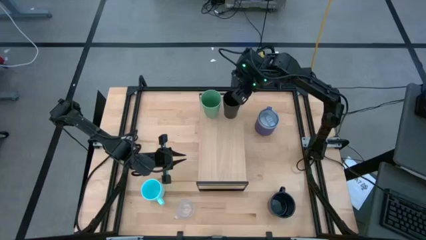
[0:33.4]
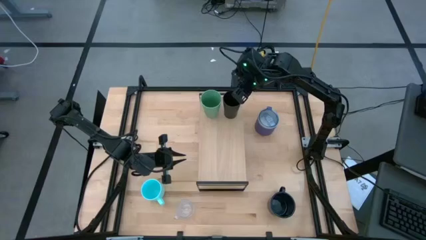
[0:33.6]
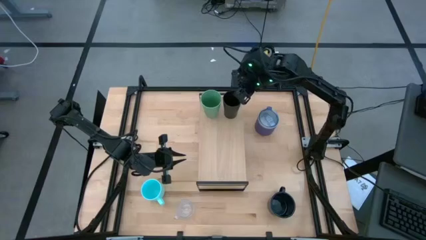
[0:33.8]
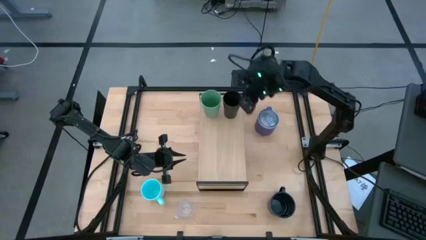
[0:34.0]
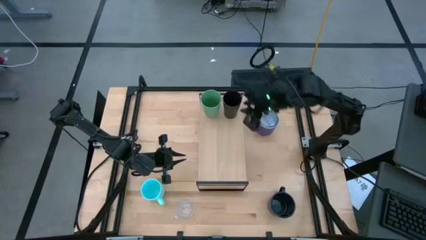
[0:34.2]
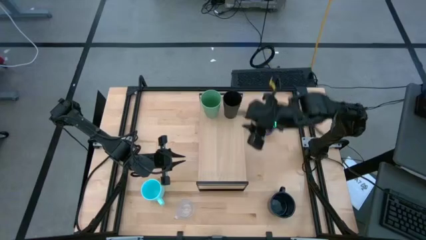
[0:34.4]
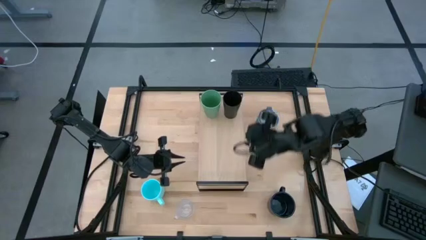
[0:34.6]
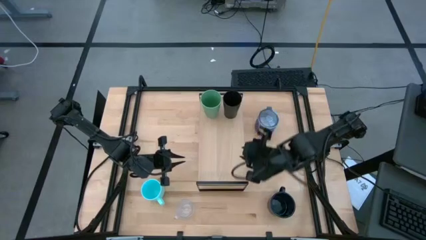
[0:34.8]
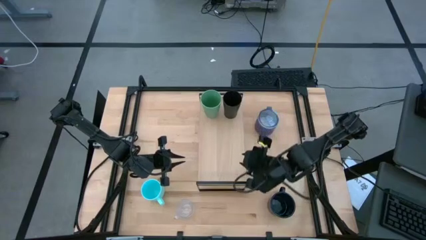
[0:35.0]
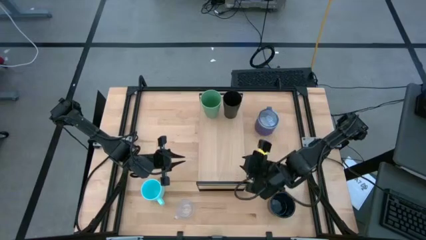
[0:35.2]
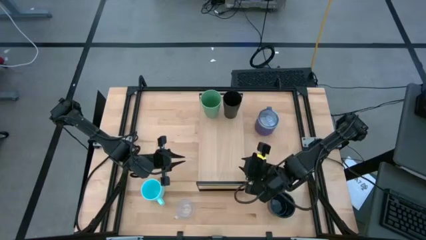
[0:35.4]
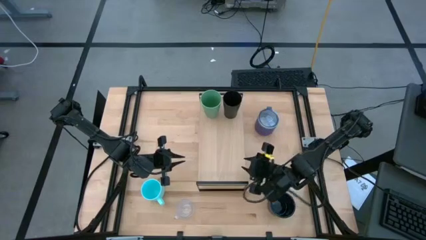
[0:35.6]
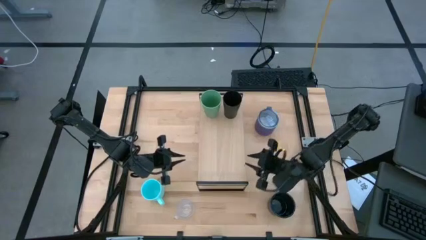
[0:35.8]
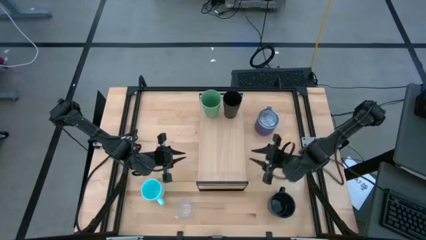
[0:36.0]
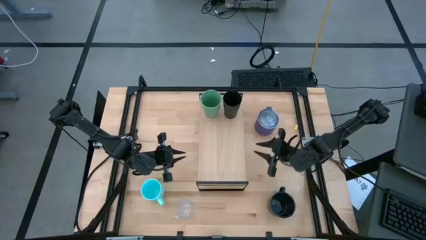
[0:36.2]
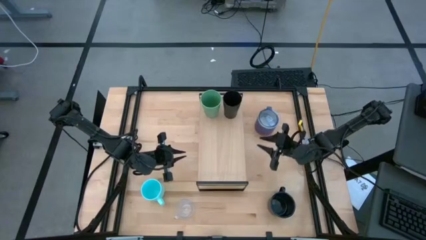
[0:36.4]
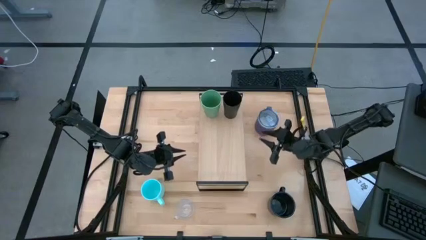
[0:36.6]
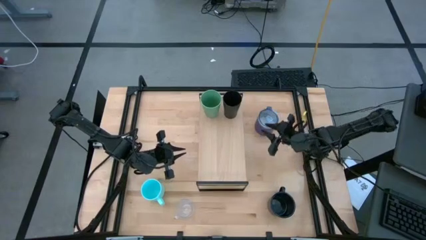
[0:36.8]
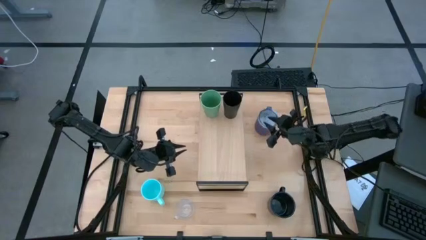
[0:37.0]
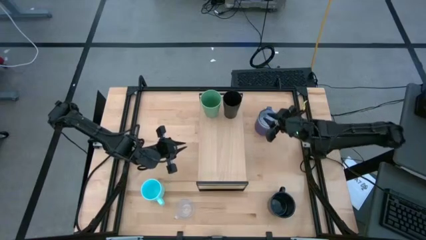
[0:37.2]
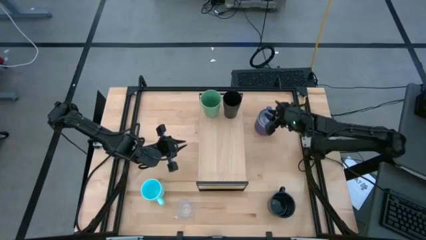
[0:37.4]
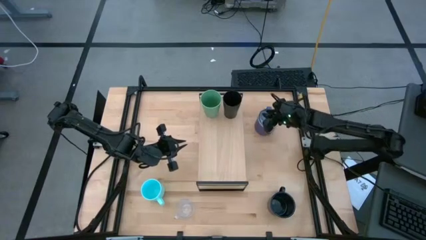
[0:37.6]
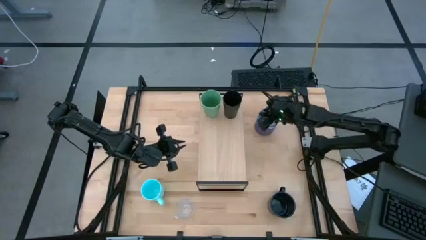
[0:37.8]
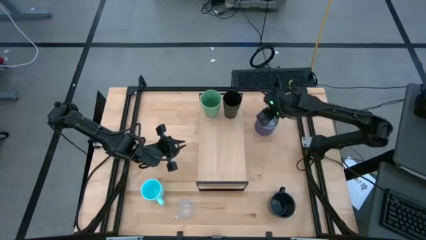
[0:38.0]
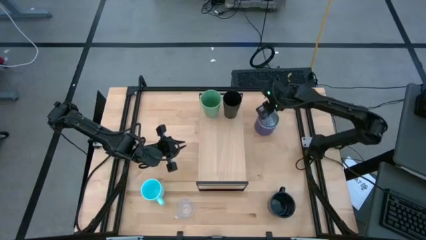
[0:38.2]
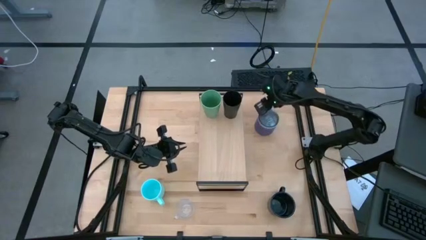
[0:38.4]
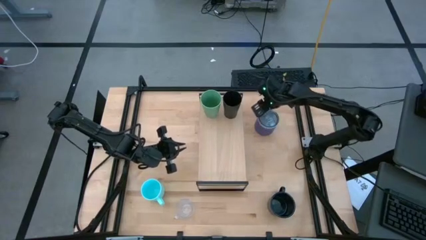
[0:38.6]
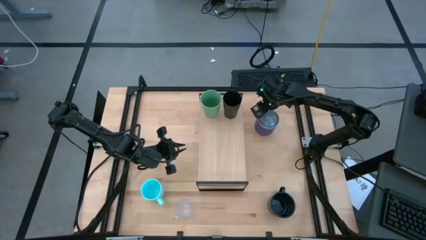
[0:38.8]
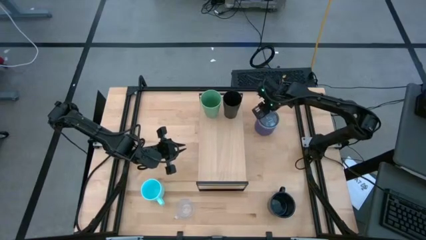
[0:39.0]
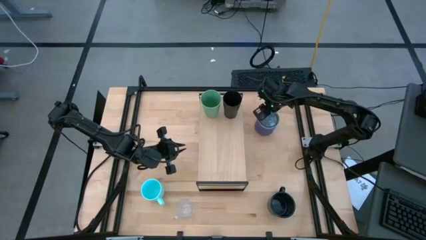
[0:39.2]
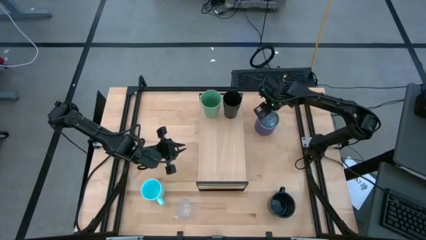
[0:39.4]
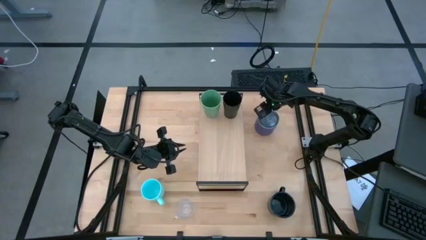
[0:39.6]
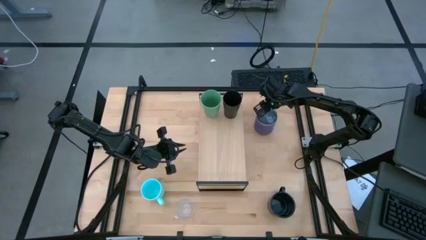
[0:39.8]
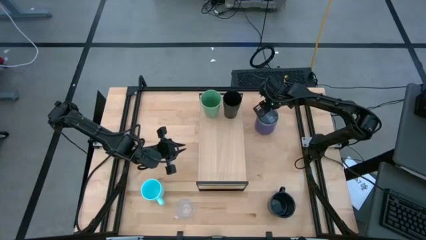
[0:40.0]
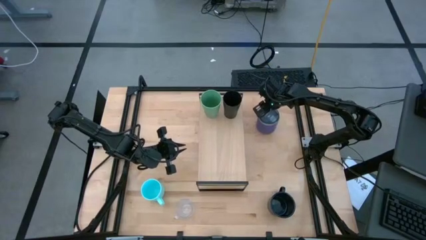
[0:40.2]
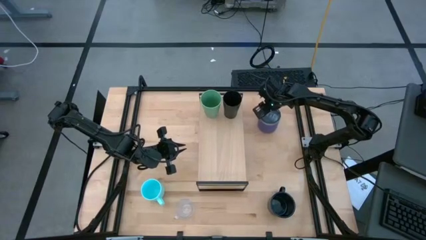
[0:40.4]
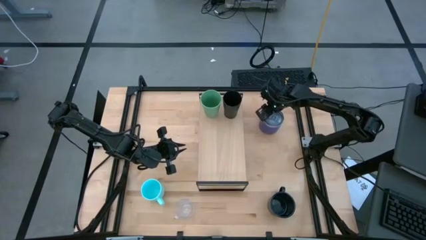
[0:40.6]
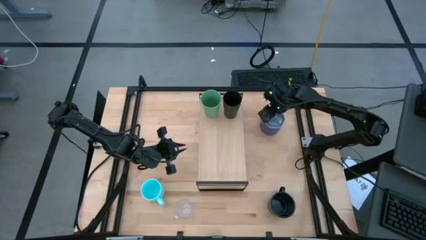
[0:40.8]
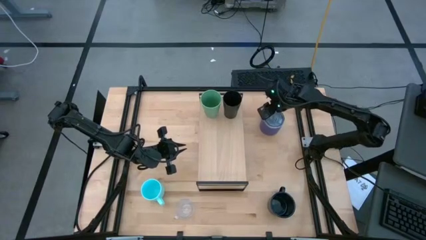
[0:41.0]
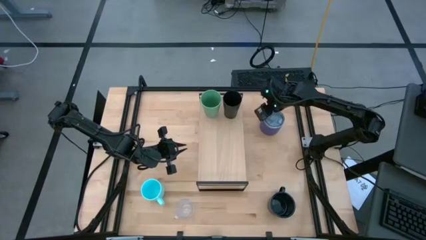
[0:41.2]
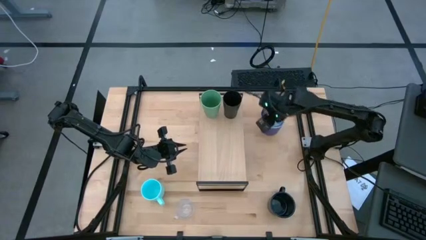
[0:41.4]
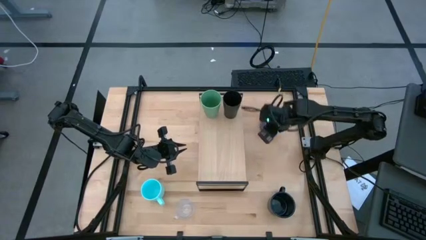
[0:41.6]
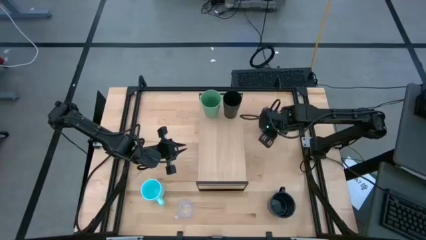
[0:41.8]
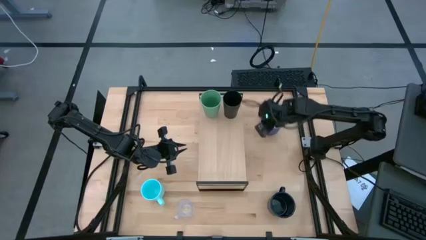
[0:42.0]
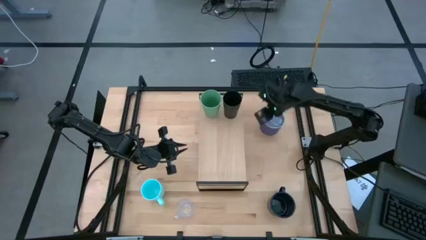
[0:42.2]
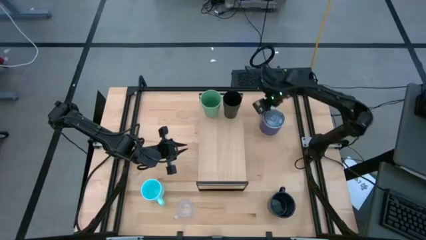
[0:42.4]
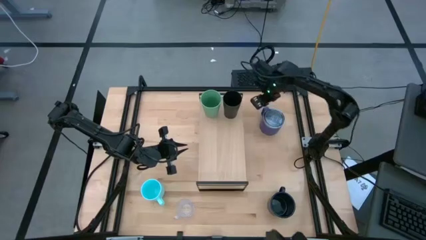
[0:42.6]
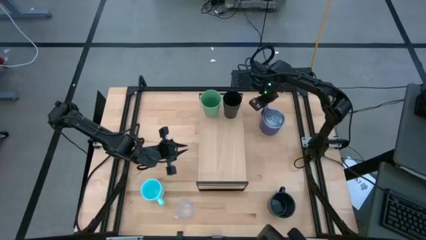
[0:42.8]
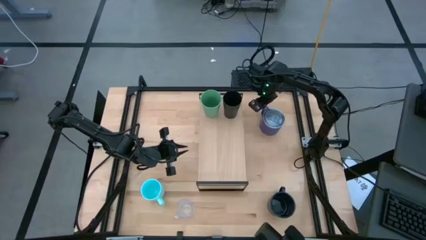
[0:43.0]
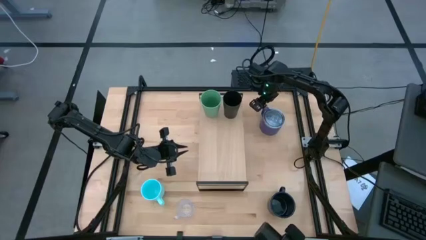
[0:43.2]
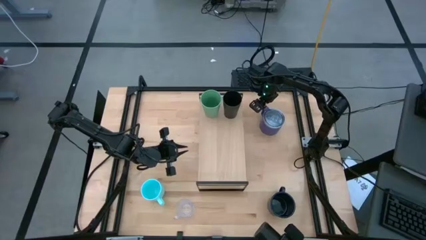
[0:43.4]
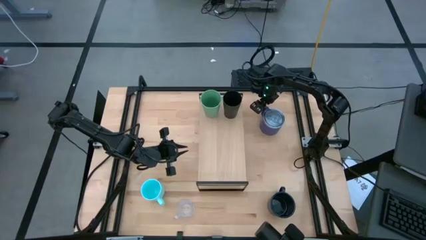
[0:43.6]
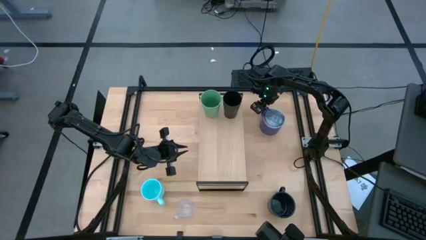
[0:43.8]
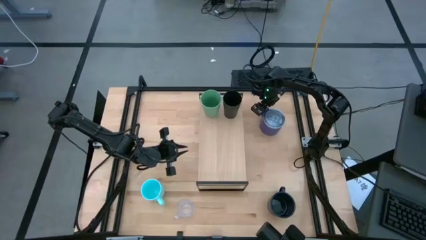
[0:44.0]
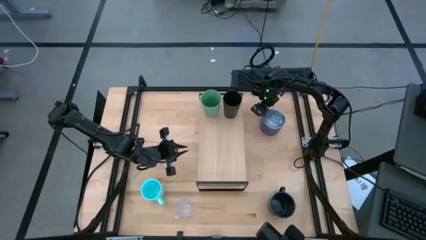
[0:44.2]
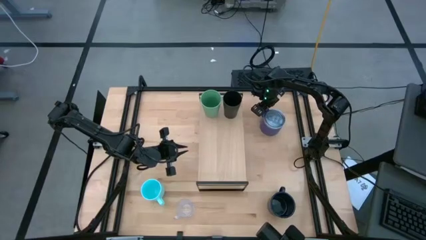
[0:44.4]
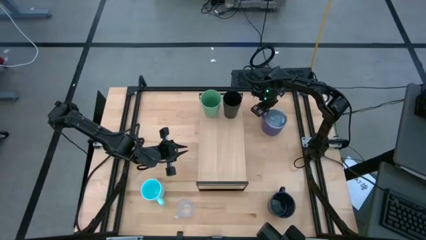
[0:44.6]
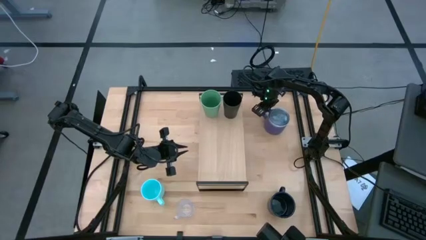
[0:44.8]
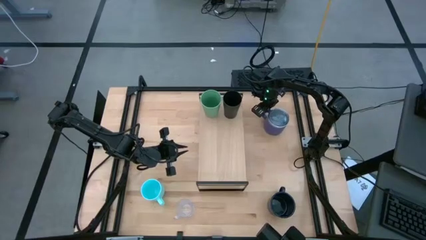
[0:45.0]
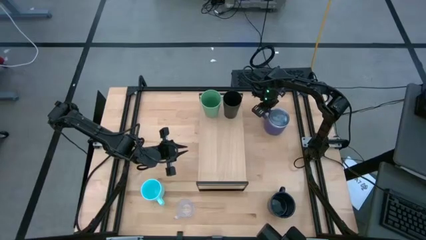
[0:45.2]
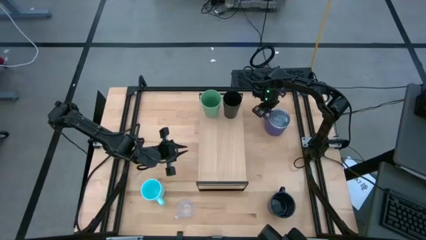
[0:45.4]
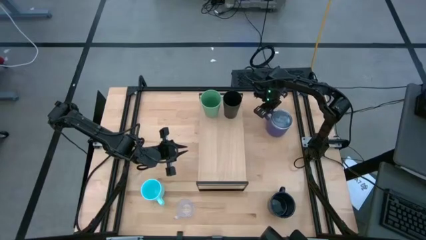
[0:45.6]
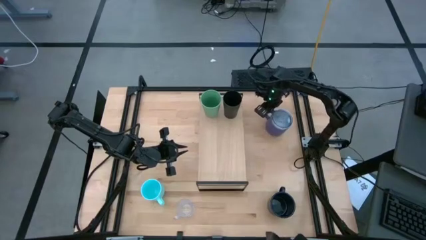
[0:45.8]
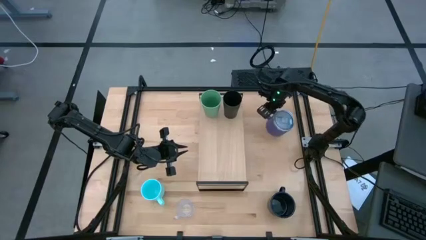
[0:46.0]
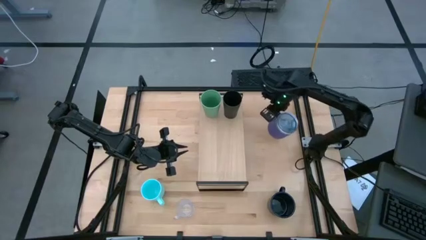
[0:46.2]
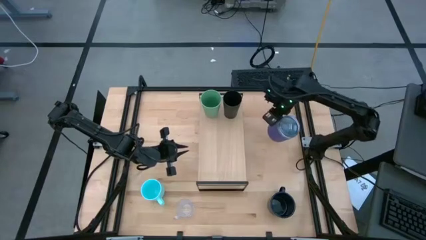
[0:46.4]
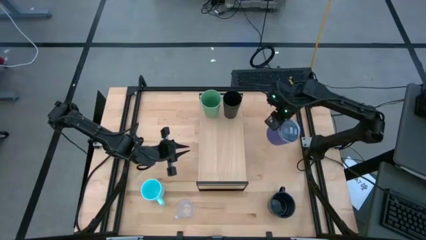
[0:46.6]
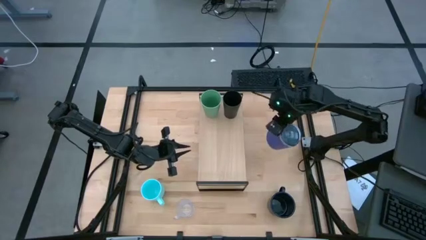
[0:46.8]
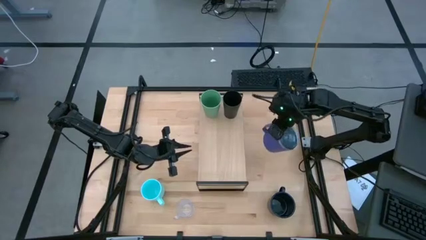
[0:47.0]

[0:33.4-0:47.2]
Task: Stack small to large cups/mugs on shelf
Put the purple mug on the shelf

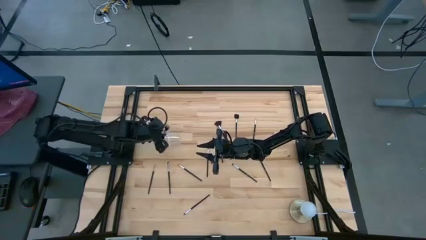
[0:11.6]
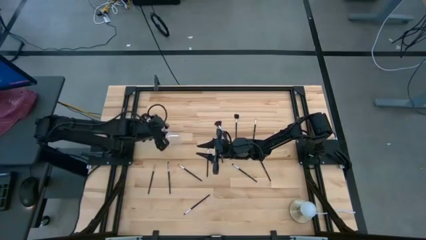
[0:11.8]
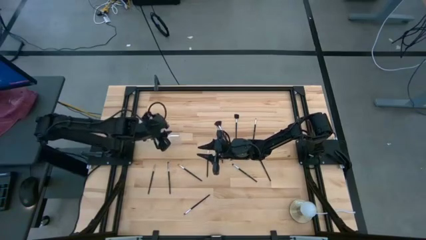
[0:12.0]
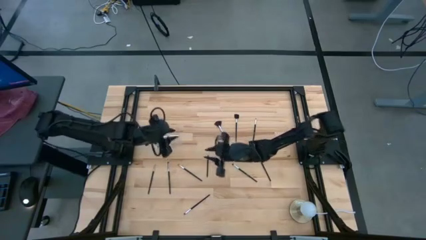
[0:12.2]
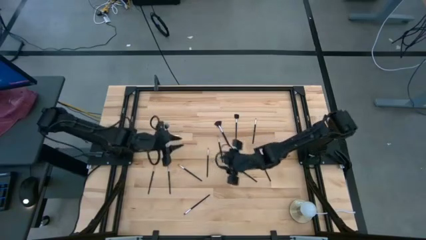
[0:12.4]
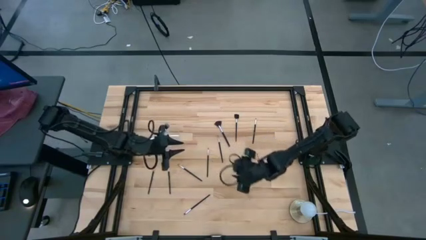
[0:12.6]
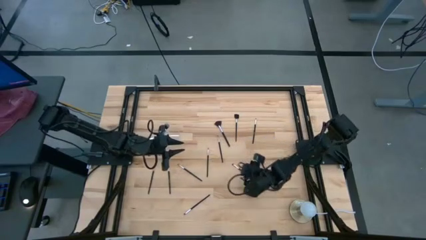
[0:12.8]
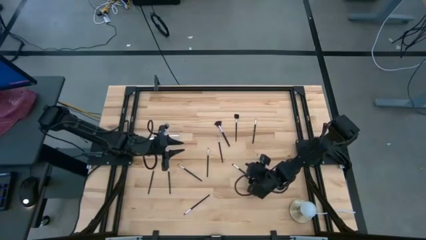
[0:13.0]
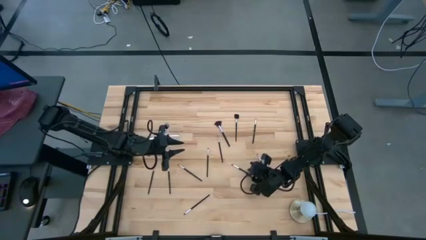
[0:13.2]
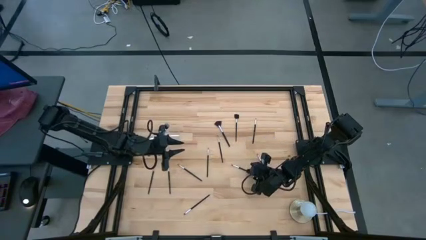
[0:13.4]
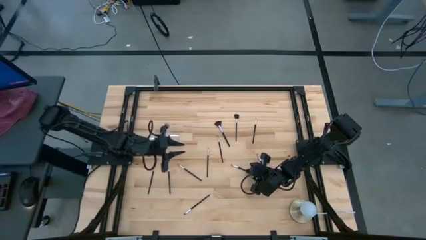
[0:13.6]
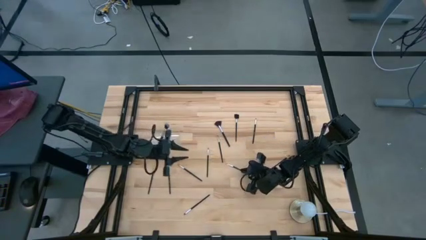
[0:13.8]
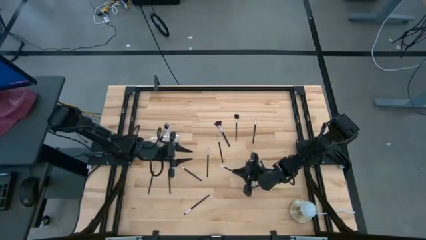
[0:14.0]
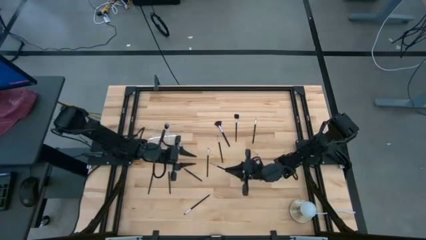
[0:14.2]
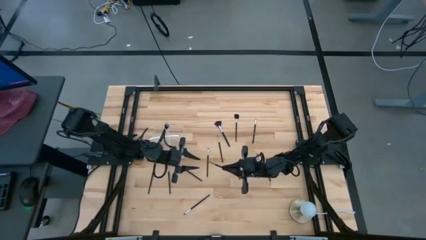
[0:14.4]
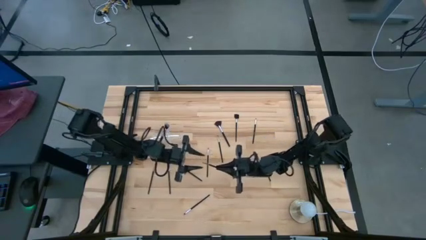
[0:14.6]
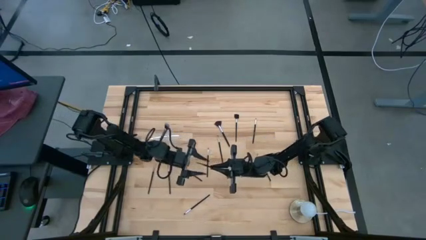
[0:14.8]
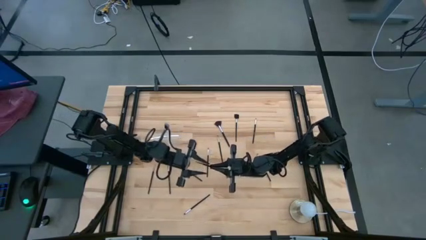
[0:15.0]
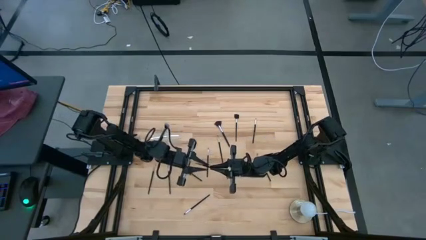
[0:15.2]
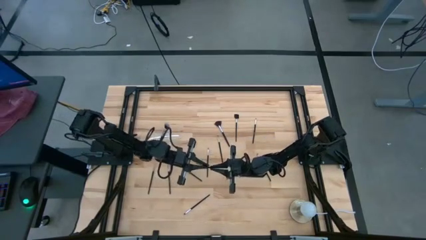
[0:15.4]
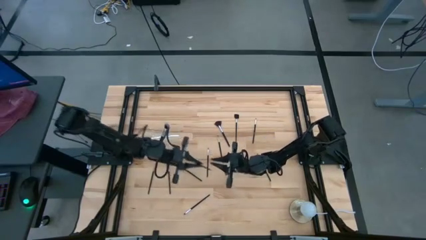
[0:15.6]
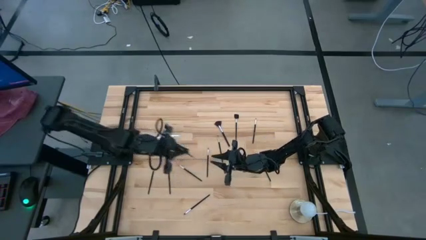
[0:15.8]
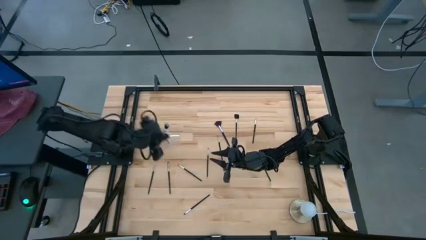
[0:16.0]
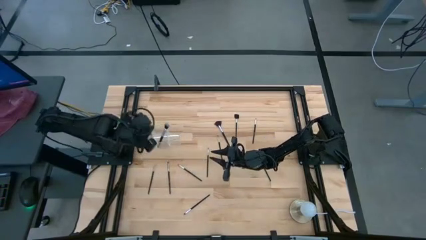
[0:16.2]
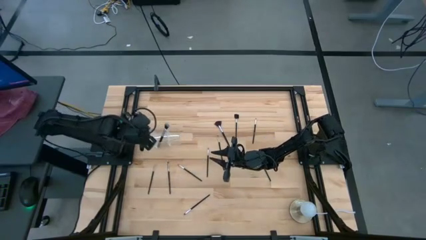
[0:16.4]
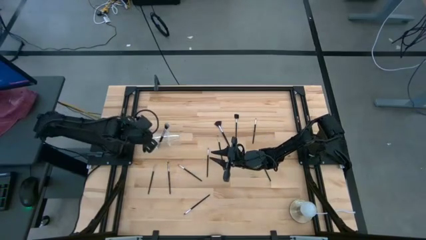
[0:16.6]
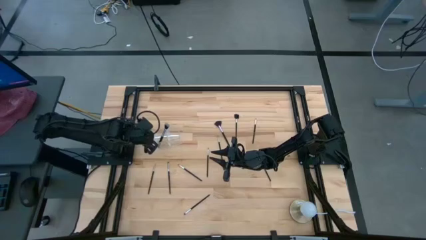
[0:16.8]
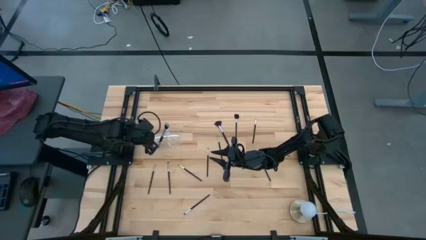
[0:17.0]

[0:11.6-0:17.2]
Task: Put items in baskets/containers
Put the black eyeshadow brush into the transparent organizer
